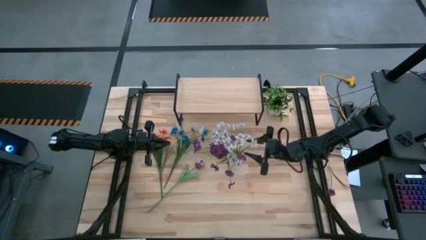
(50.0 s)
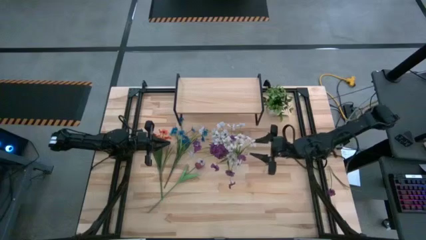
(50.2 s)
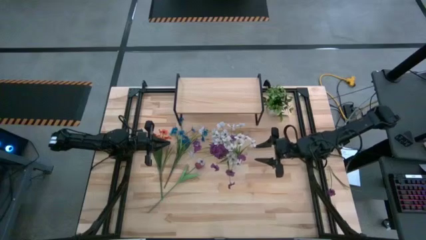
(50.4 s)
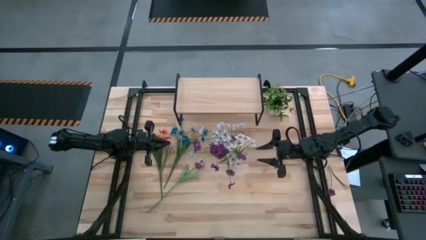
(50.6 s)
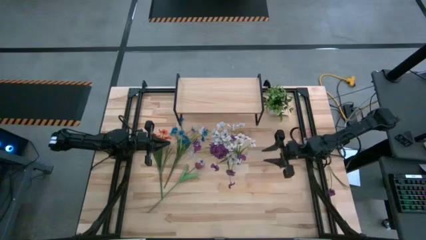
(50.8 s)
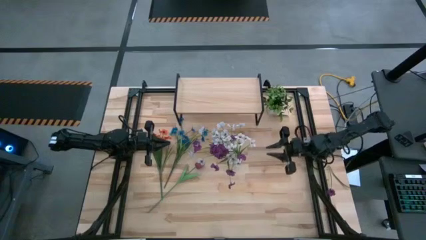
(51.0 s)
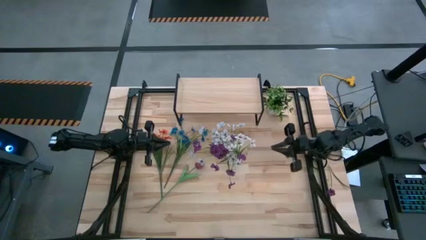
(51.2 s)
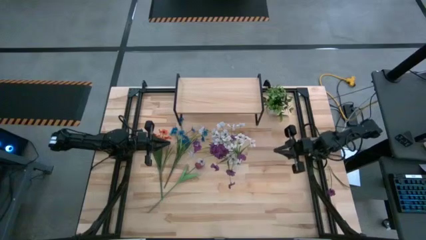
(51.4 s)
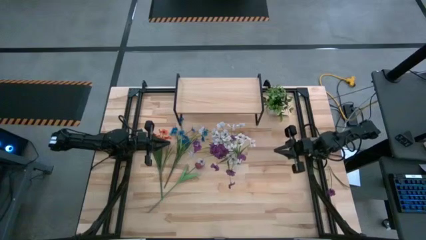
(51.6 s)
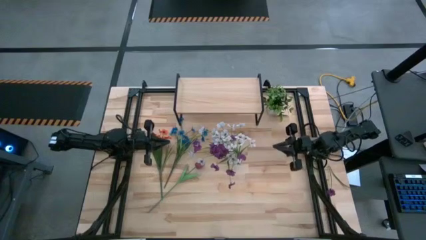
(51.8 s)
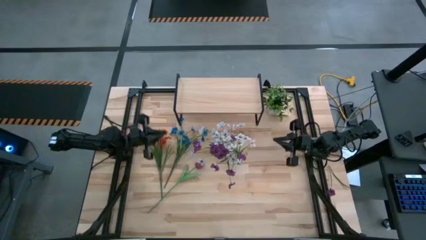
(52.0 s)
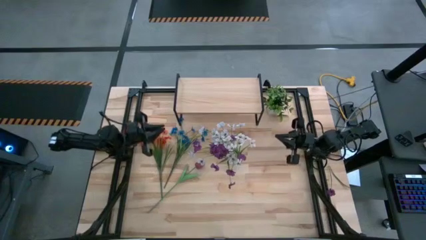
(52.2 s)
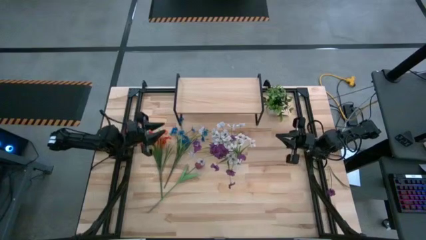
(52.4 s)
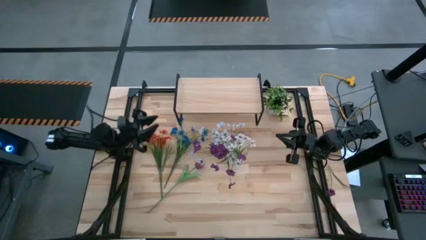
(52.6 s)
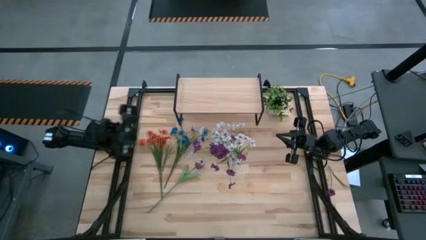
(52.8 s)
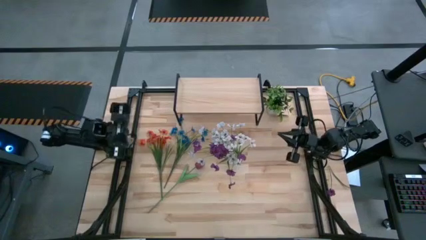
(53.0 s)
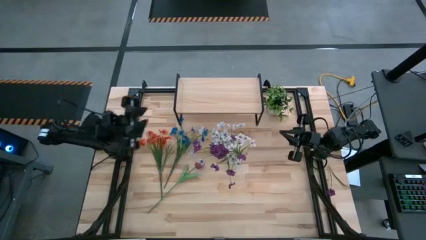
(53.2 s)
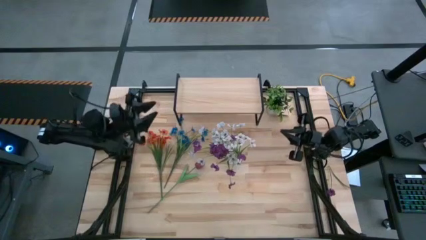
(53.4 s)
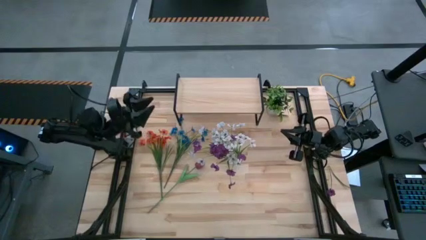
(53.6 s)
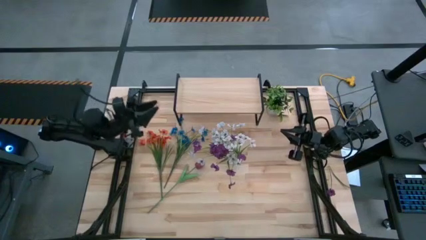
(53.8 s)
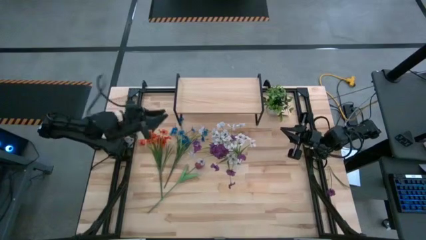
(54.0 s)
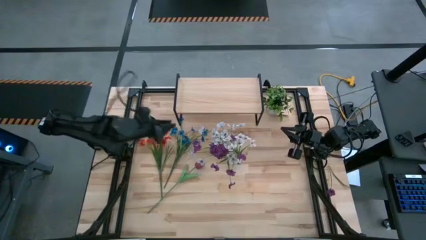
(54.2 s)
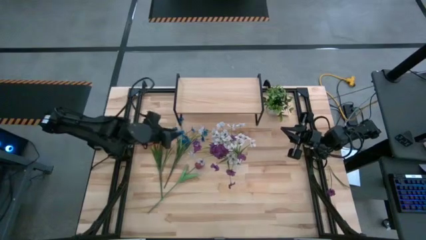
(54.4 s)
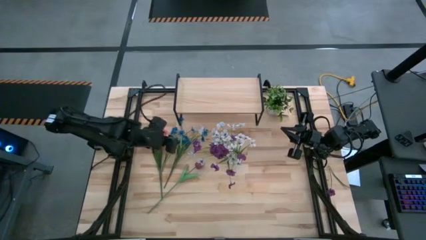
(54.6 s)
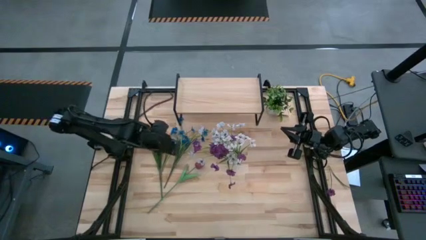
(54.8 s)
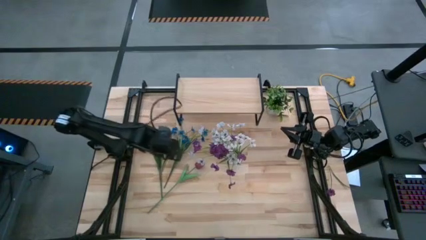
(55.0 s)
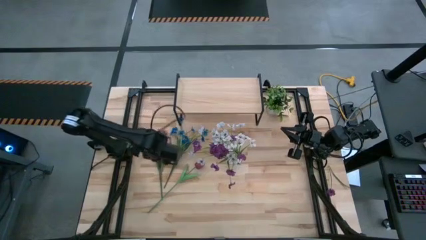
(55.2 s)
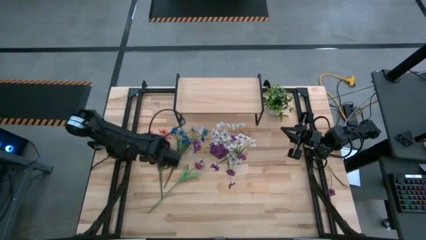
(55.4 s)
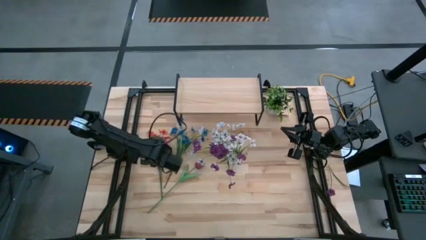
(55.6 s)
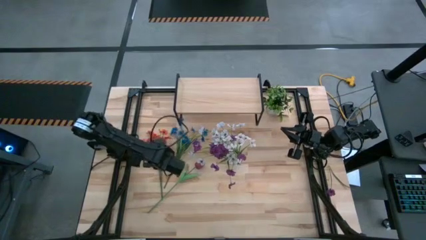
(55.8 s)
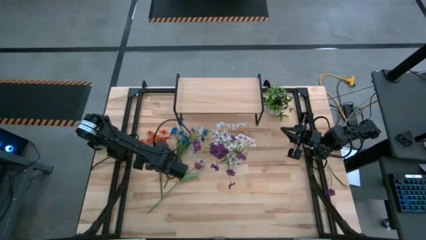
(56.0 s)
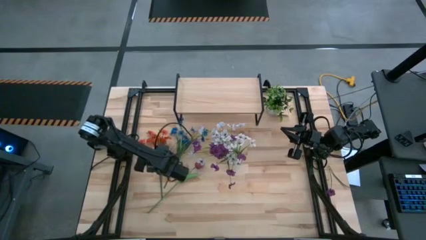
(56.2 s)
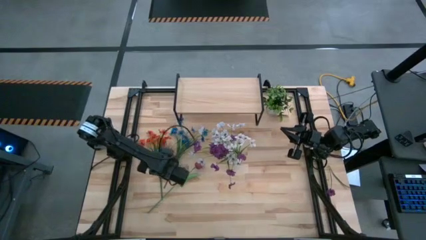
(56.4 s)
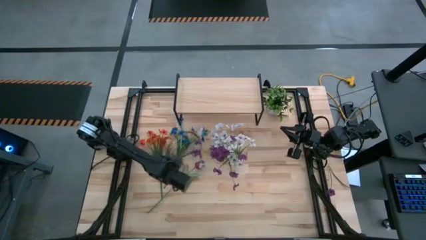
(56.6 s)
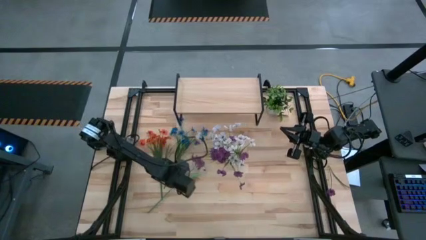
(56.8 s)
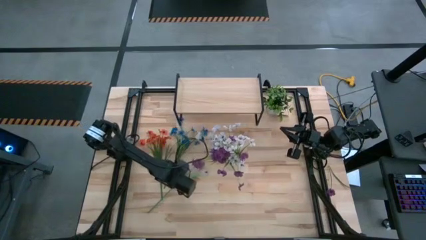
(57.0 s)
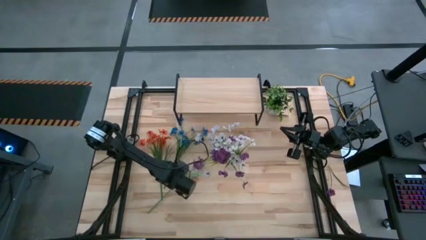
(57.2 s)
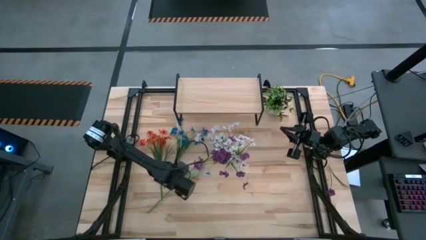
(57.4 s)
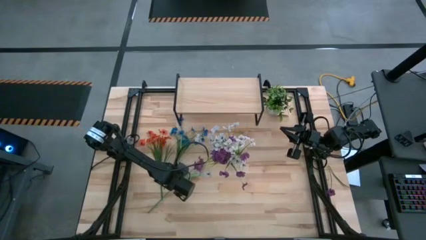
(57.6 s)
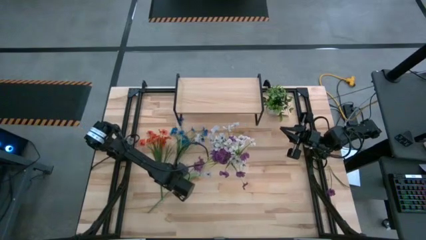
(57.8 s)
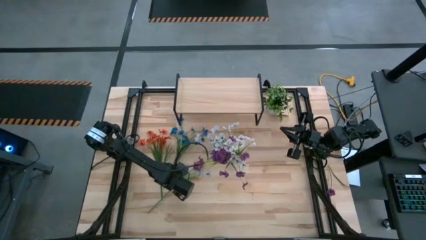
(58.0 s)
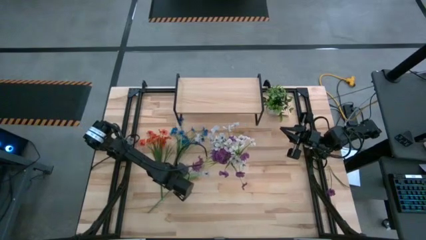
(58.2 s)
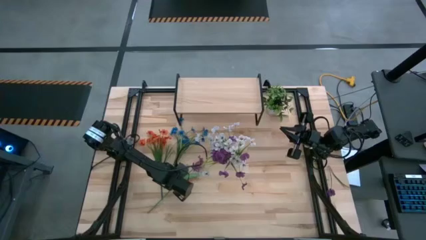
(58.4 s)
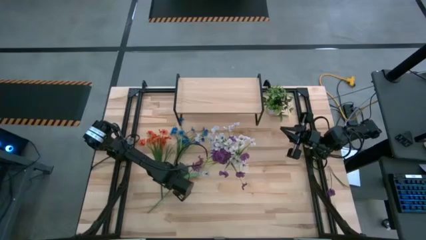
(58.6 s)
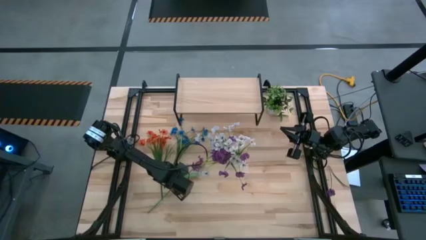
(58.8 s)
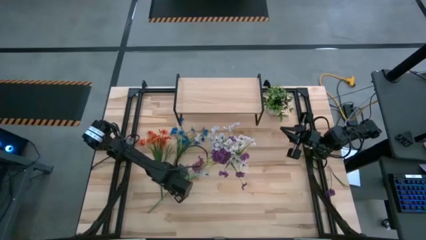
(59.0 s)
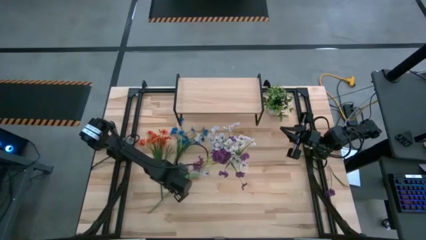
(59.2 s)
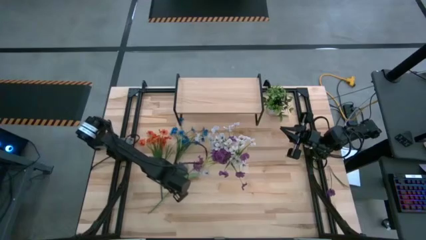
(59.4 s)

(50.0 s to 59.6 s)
Task: Pick and place flowers into a vace then onto a shelf
Put the red flower into the transparent vase

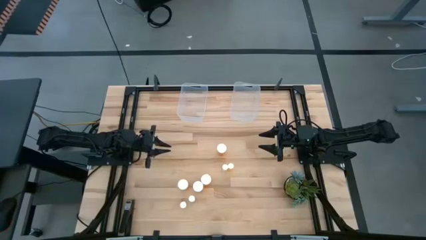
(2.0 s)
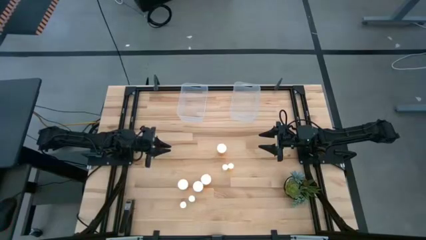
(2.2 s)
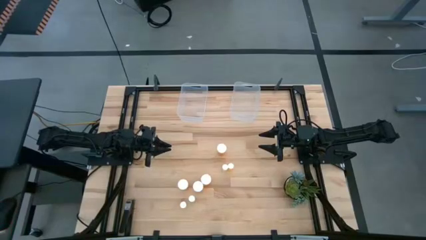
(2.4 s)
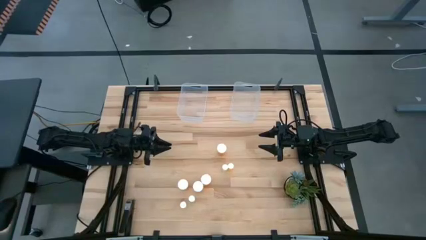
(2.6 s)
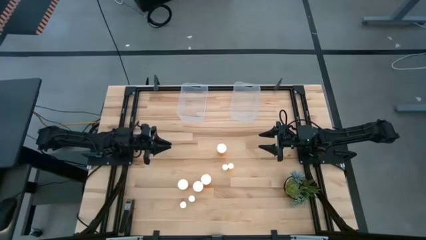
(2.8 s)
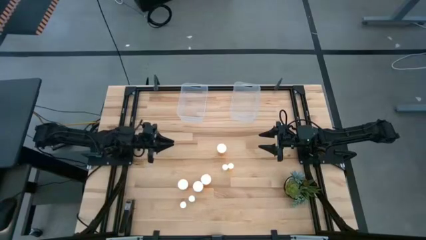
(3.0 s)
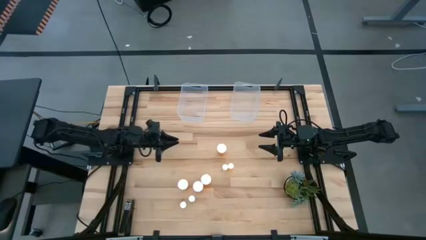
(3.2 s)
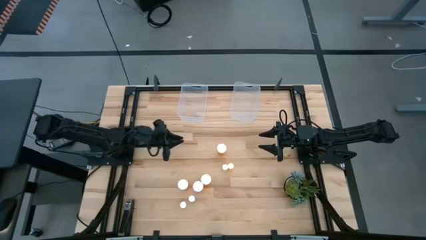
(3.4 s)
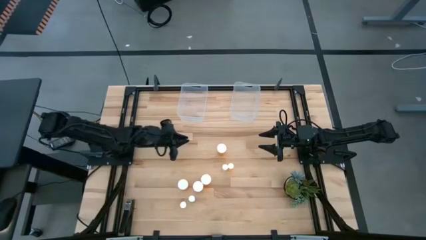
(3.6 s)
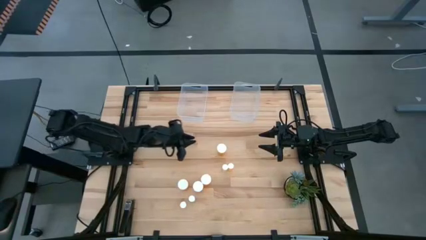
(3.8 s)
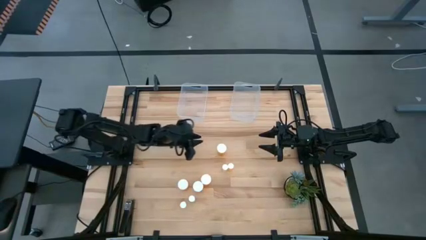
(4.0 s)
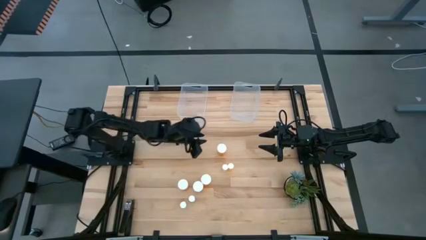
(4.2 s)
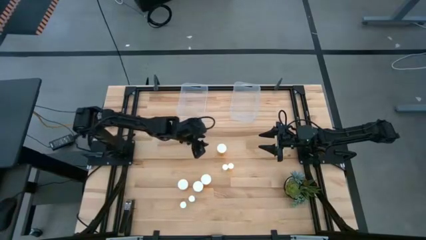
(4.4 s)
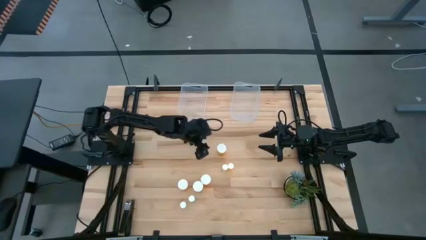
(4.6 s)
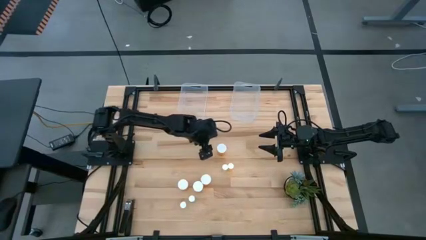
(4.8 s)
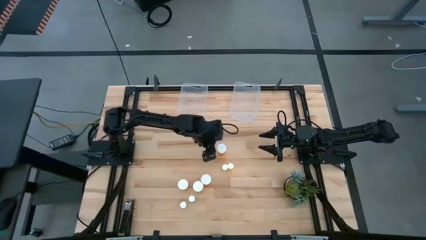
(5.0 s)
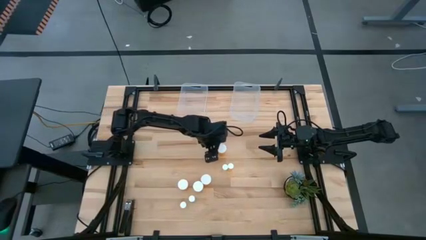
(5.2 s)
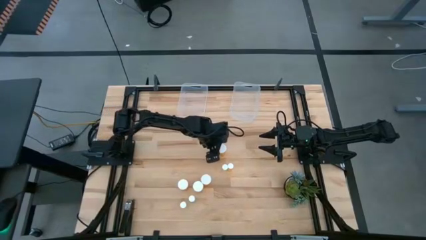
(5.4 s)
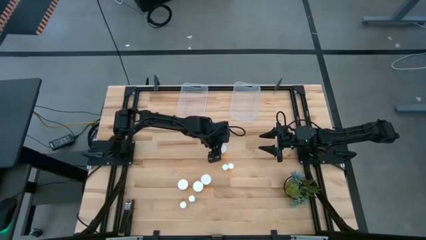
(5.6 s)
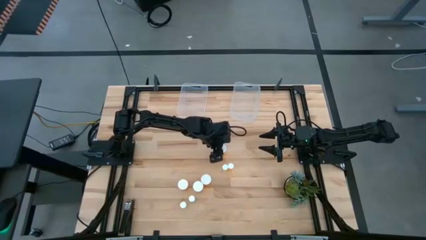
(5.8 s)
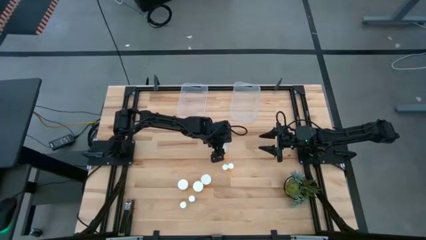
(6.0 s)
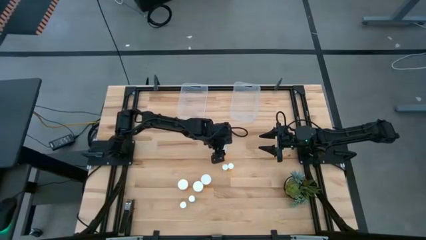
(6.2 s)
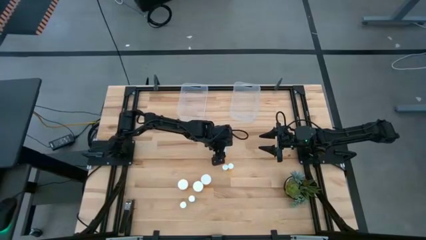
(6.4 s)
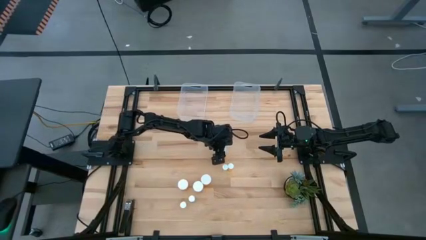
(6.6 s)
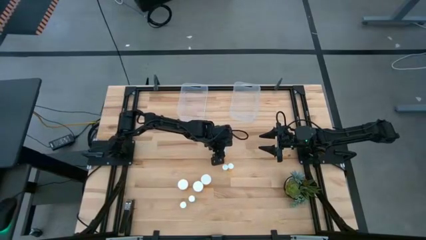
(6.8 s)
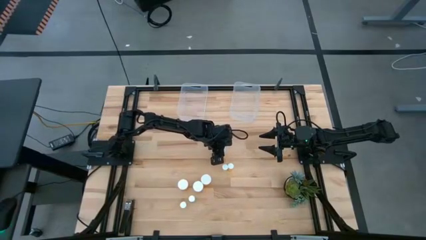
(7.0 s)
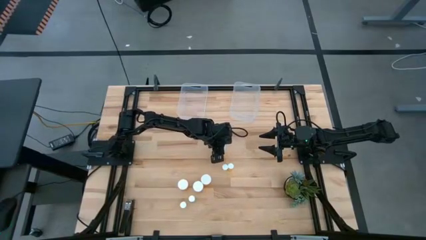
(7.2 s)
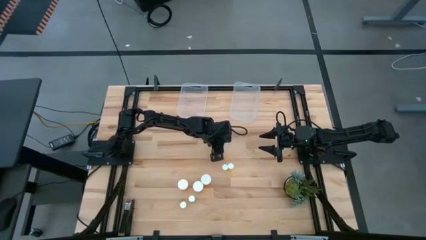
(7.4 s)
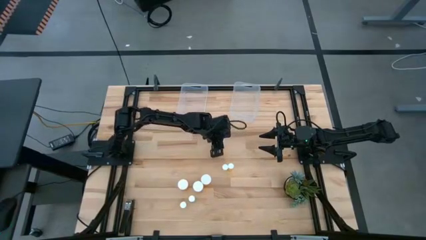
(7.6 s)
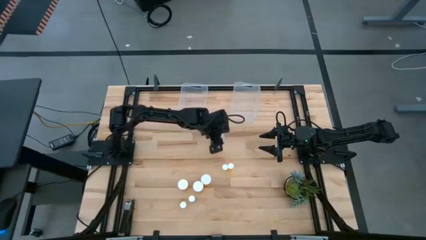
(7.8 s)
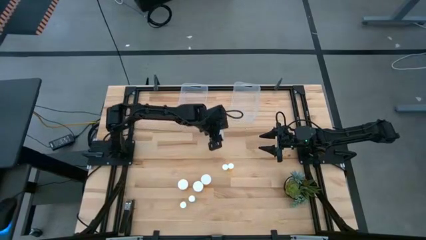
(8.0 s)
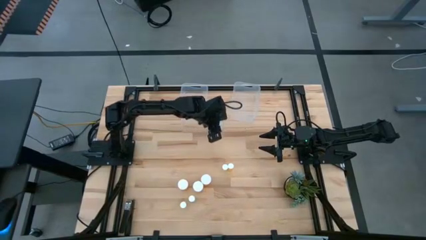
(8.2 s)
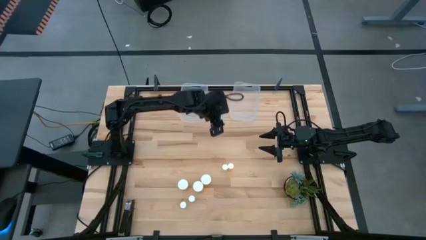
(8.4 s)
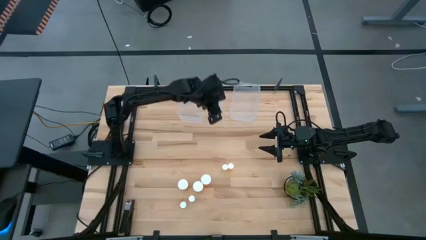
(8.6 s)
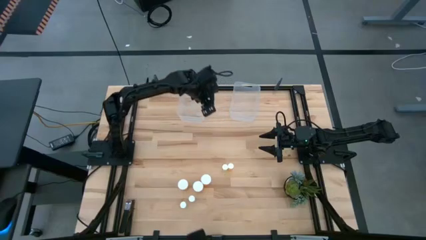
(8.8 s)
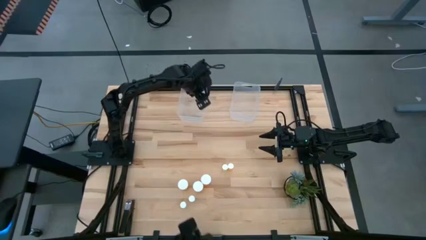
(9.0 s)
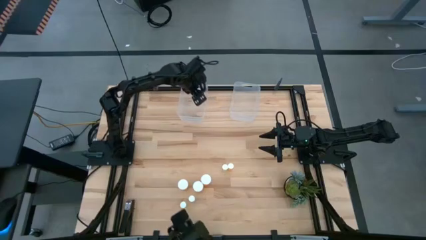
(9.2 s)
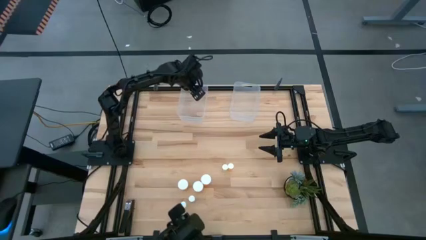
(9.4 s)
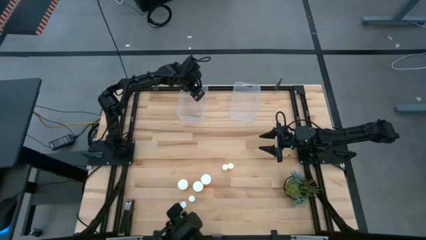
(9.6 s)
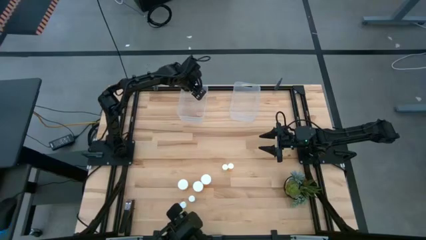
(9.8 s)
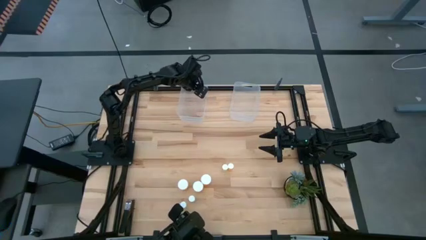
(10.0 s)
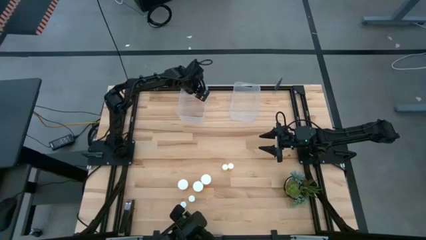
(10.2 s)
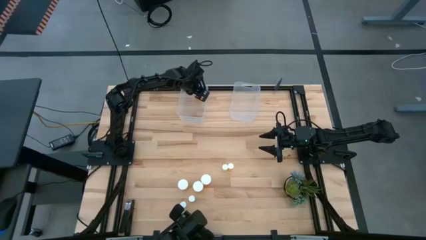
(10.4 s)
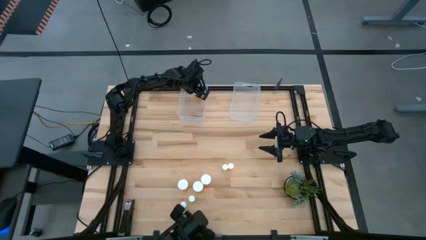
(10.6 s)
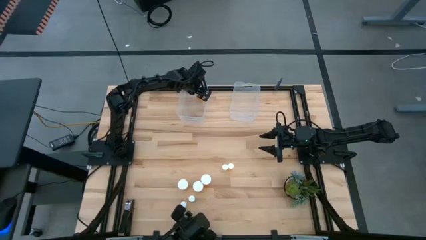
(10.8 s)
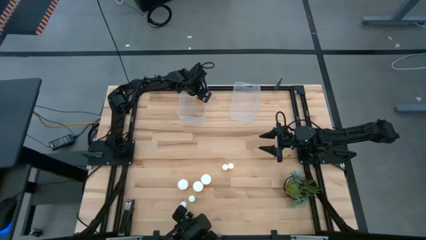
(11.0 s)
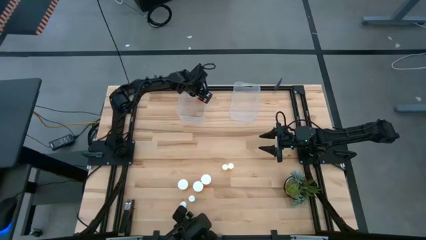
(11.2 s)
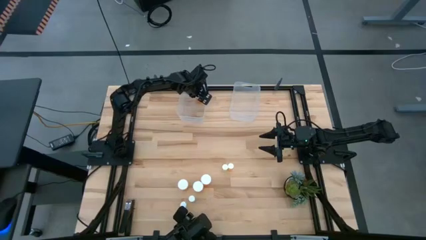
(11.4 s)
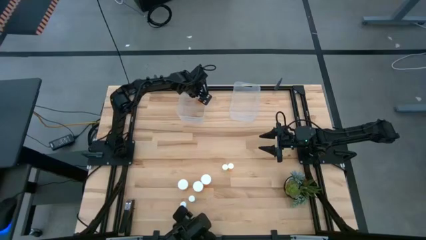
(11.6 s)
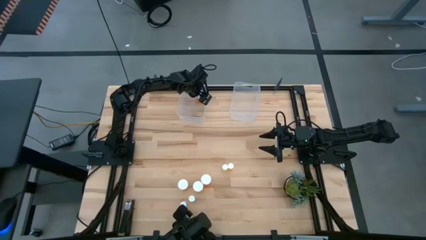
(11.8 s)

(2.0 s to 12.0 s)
Task: Pick and place medicine bottles into bin by pill shape (circle, oval)
Put the big orange pill bottle into the left transparent bin
